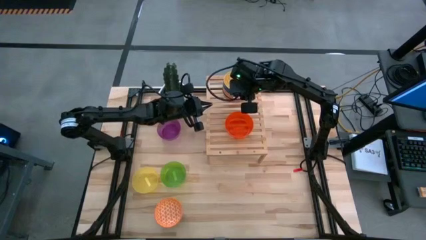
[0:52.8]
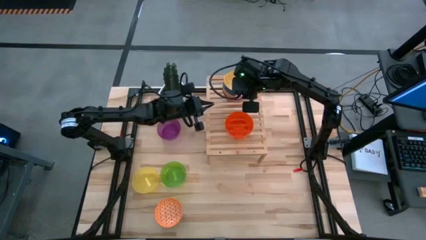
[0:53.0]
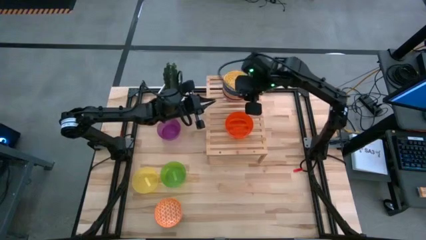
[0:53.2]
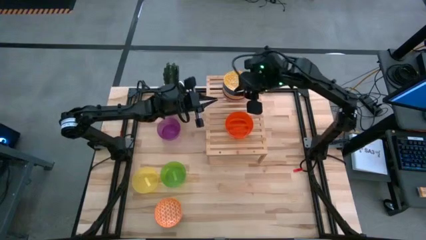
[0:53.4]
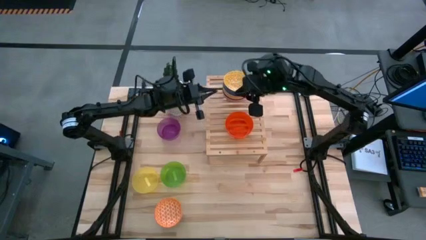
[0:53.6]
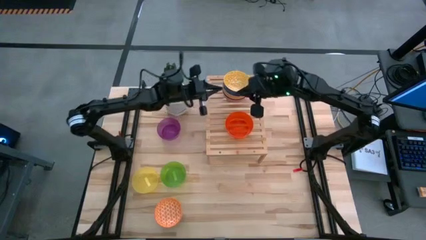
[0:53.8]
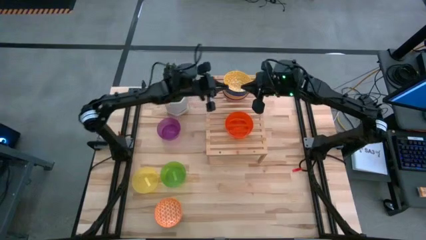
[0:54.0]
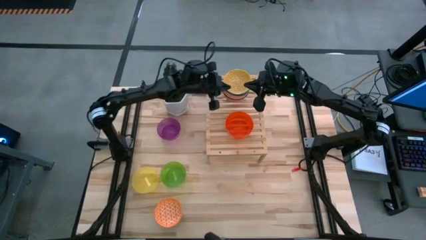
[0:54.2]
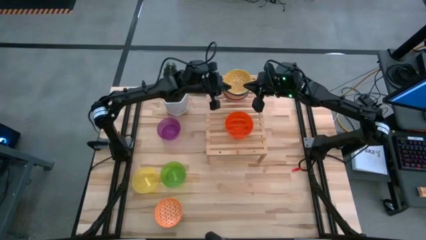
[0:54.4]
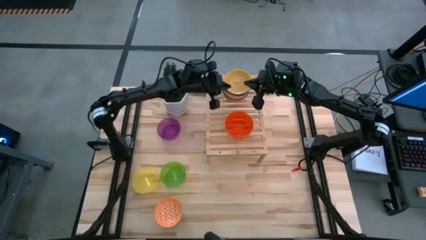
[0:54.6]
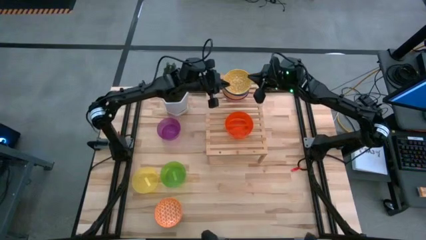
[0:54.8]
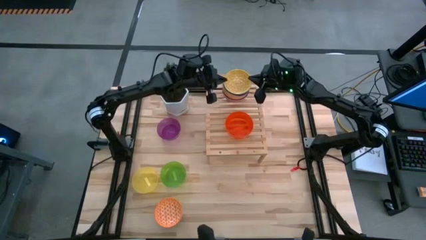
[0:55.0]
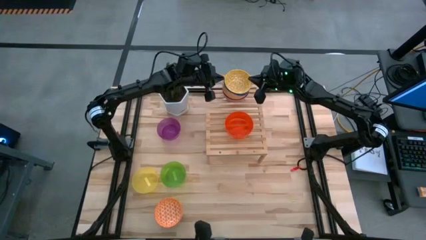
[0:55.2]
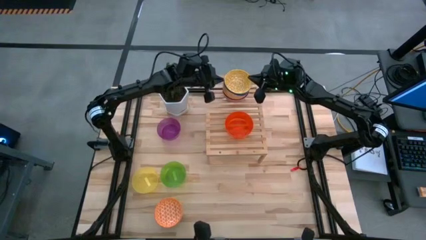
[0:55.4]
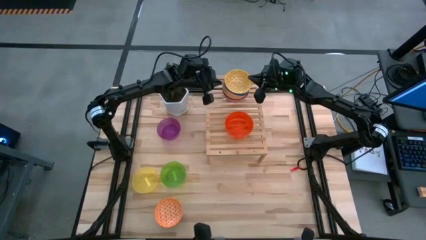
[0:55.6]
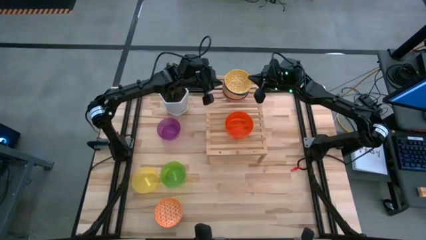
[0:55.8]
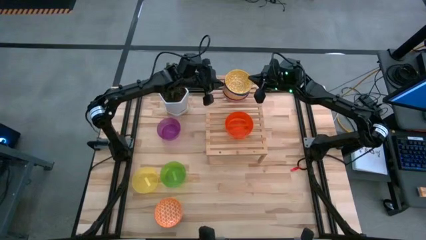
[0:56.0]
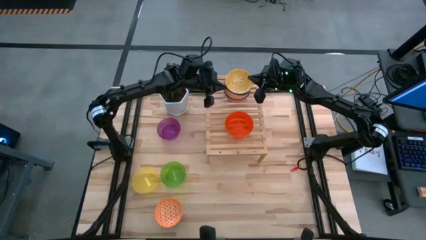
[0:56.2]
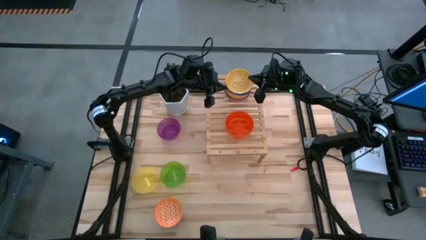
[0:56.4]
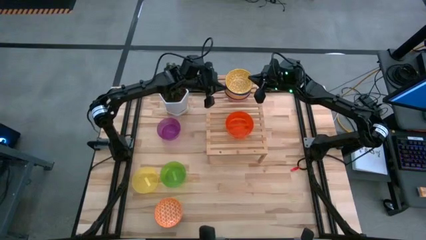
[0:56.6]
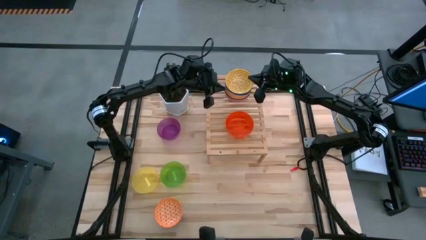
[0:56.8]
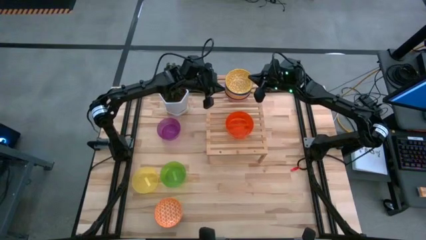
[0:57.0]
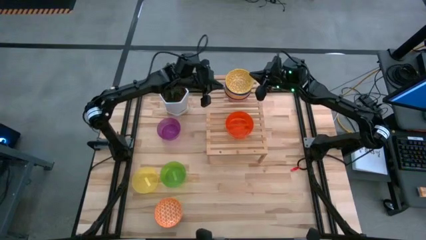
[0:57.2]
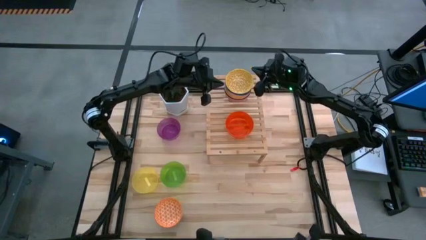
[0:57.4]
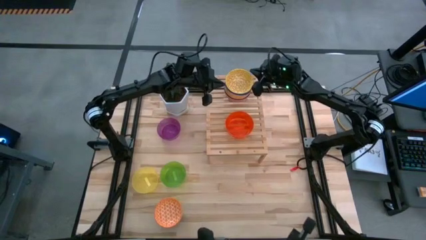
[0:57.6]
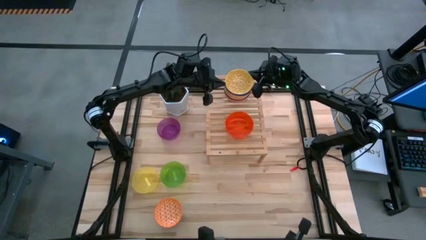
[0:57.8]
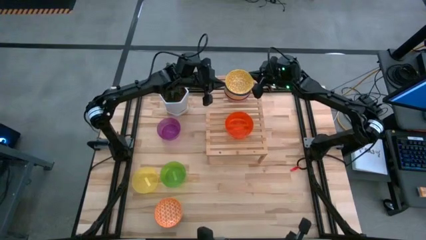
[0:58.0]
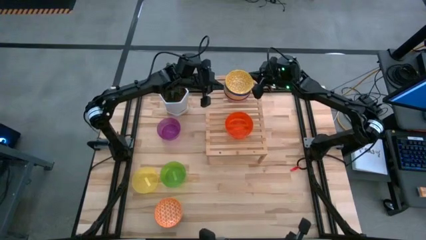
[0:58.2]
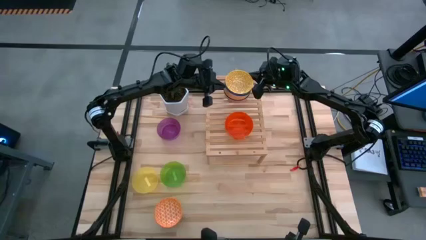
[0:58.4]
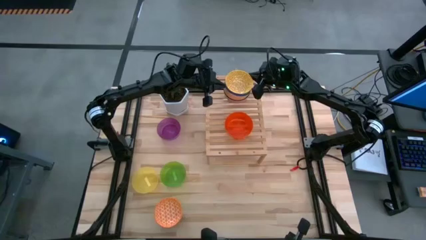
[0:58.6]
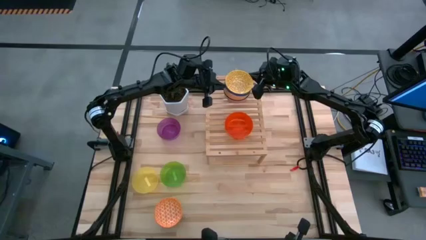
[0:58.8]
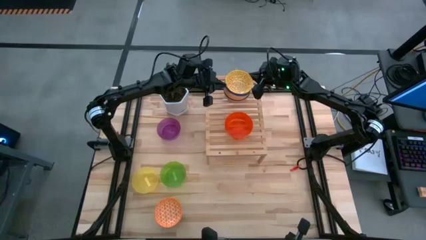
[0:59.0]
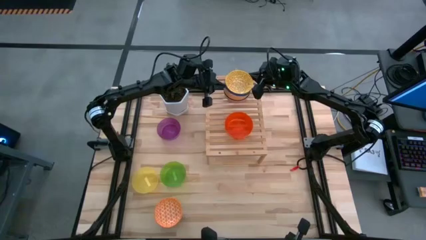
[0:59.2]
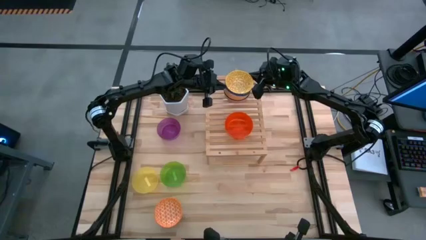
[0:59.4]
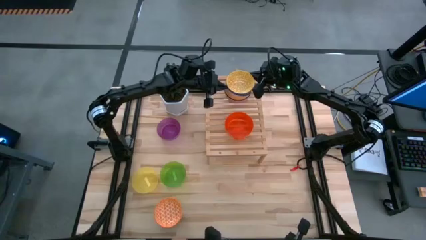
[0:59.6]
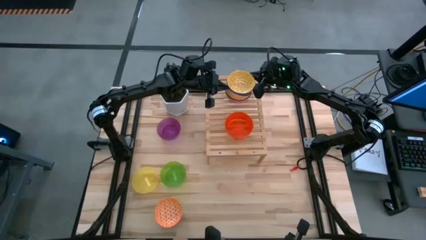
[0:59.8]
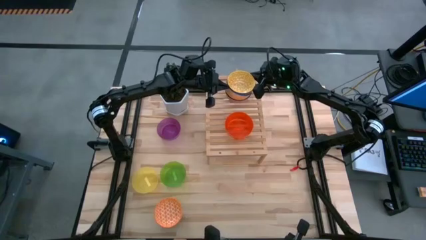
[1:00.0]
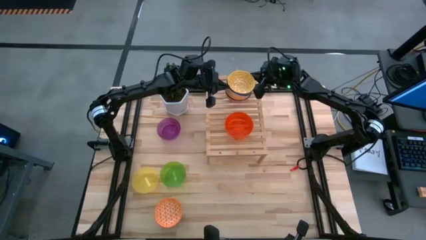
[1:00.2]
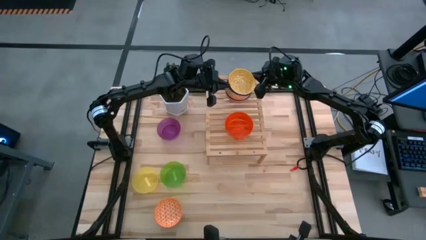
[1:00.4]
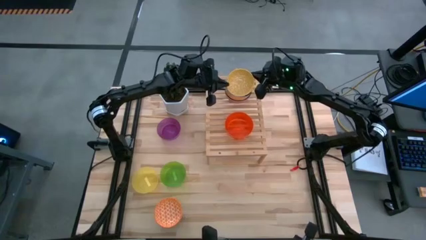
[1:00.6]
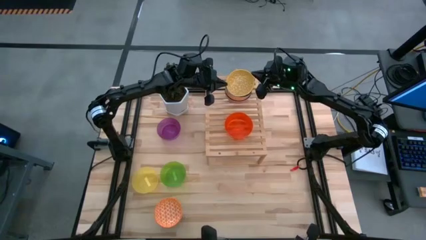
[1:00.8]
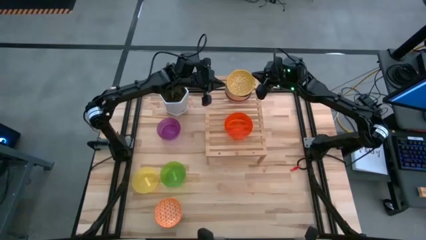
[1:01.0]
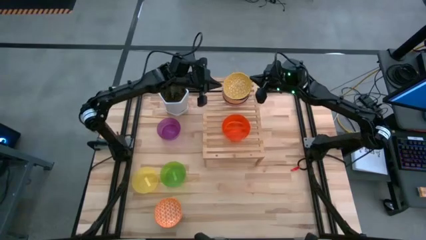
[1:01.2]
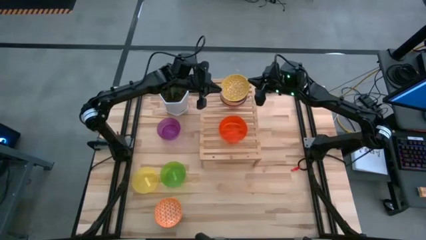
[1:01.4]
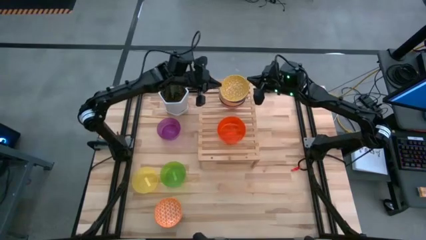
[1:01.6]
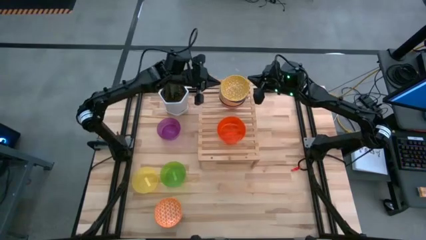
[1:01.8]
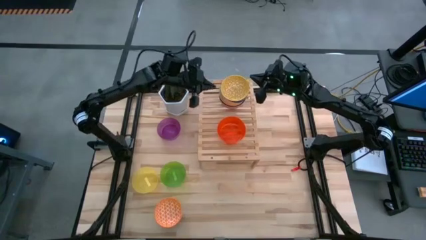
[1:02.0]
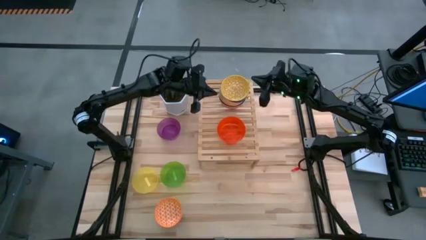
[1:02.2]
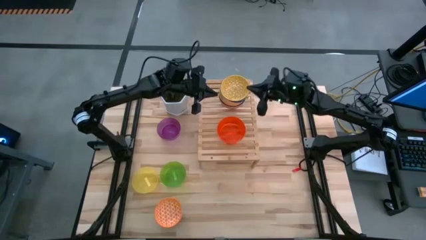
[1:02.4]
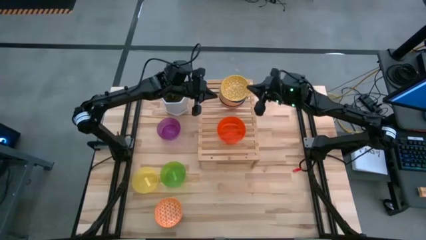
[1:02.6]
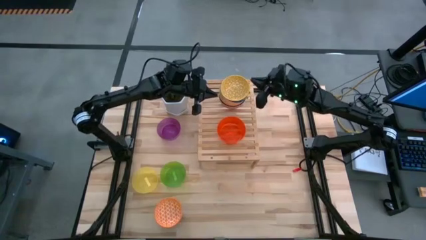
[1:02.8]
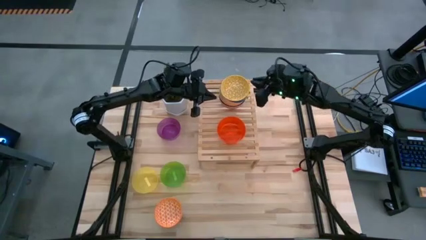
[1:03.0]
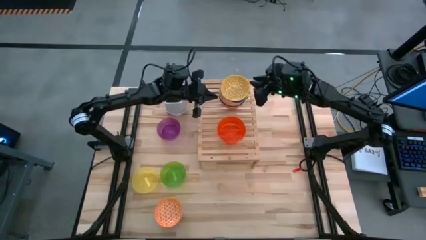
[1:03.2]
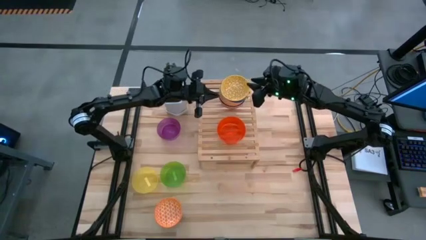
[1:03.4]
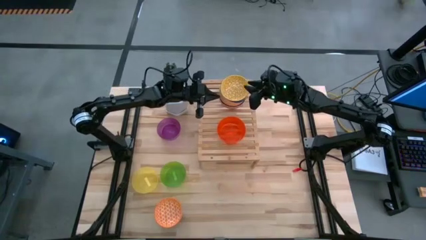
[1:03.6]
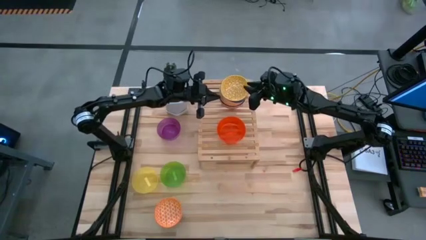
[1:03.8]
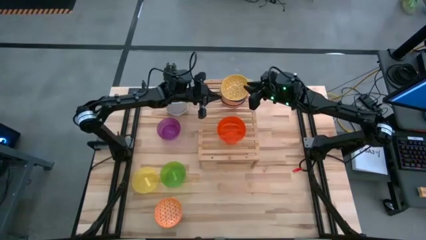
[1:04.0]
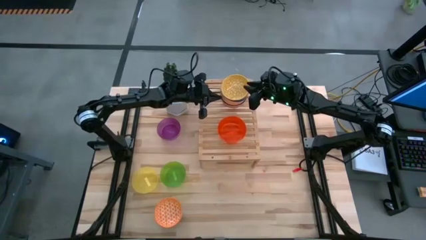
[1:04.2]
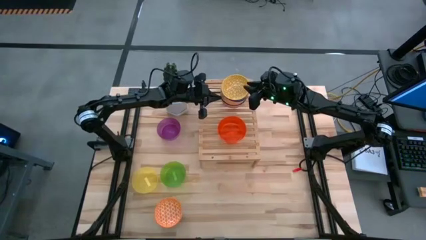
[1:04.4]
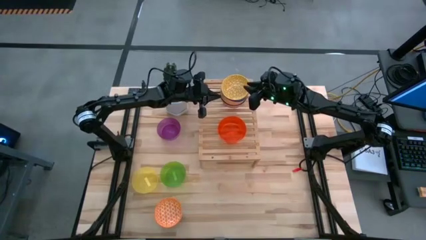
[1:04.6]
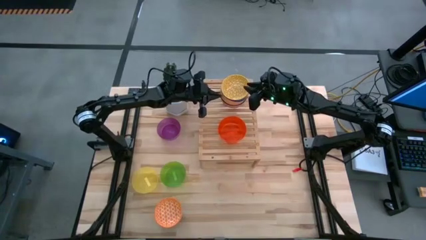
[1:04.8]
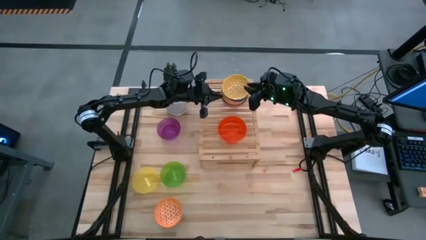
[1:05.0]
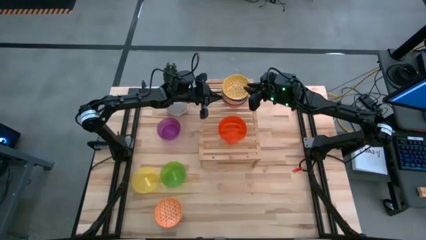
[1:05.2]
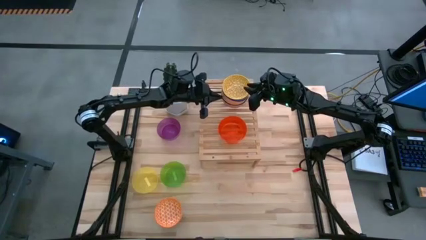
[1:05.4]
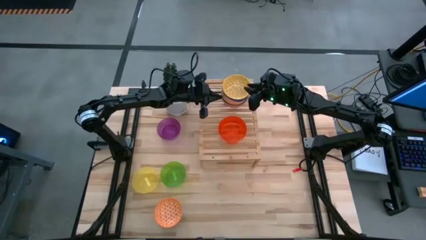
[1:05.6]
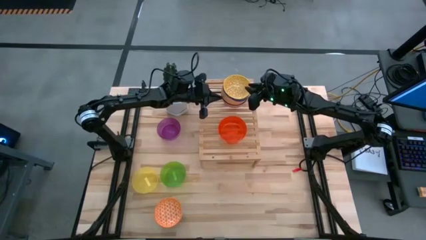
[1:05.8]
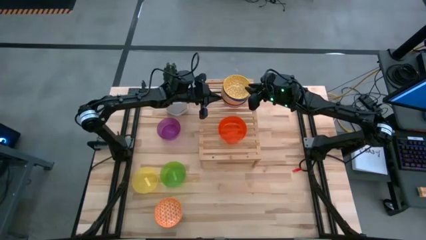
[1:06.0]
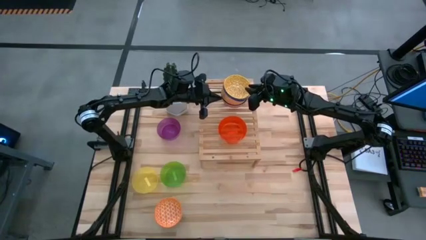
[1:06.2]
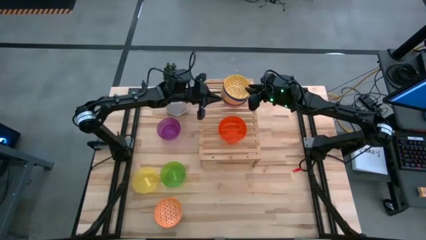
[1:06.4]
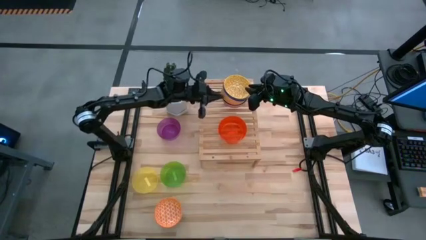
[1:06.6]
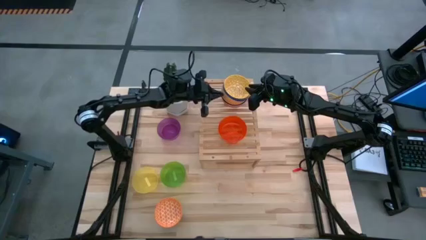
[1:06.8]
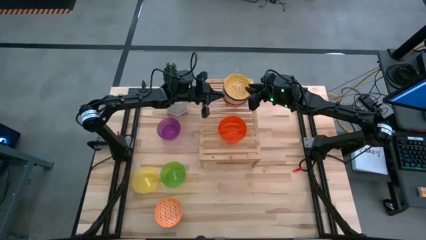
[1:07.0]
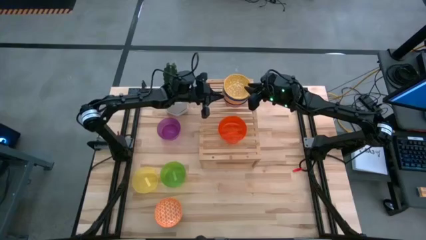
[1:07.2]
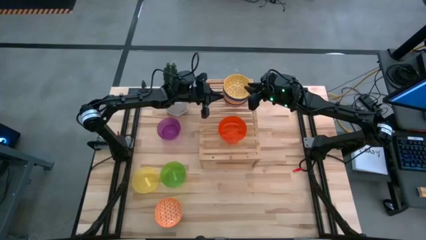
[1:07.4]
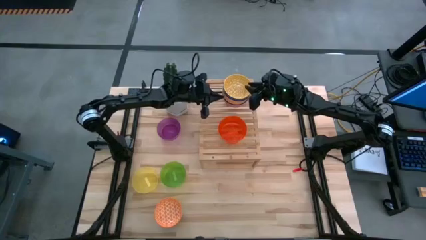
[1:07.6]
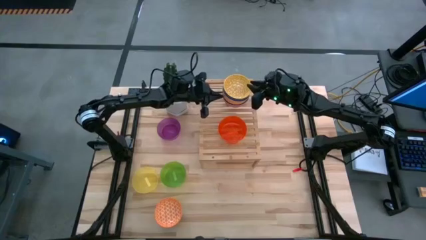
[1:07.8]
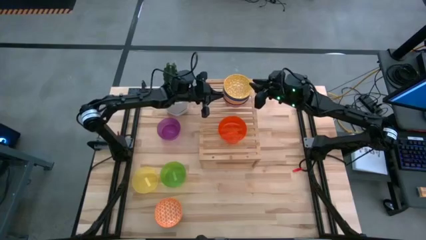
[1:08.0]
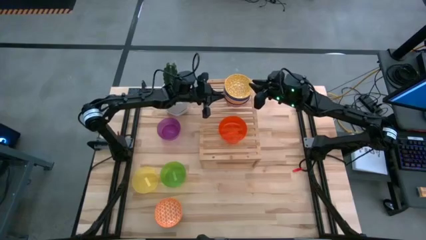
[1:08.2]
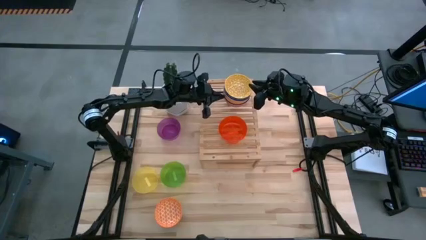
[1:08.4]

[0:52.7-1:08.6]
Task: Place and stack bowls onto a shelf
Adjust the stacked bowls on the shelf
